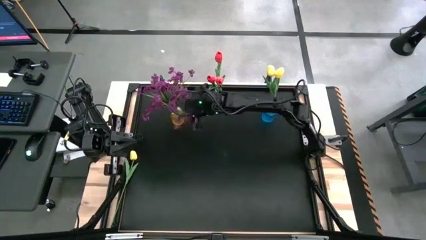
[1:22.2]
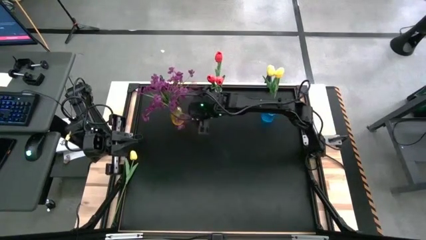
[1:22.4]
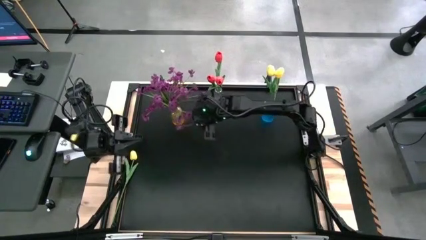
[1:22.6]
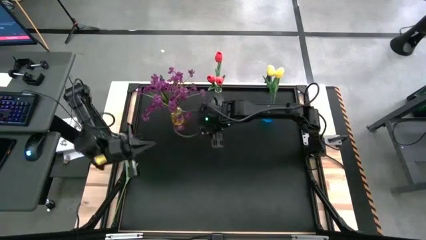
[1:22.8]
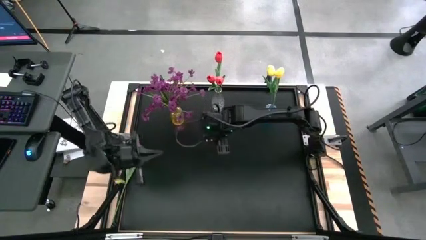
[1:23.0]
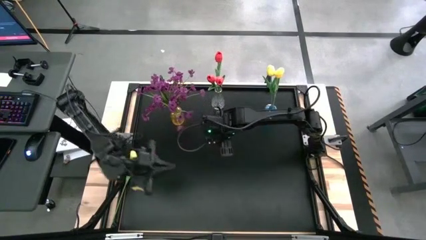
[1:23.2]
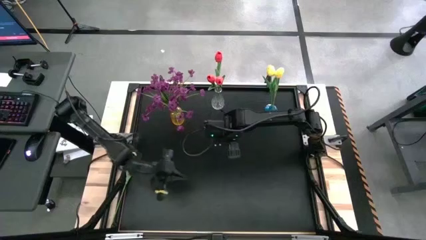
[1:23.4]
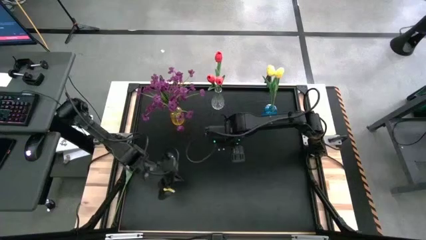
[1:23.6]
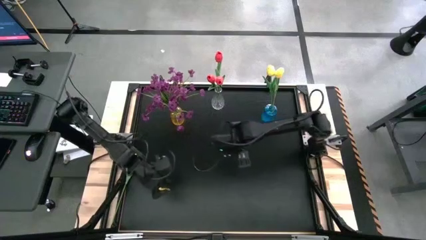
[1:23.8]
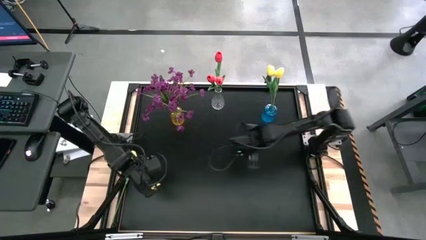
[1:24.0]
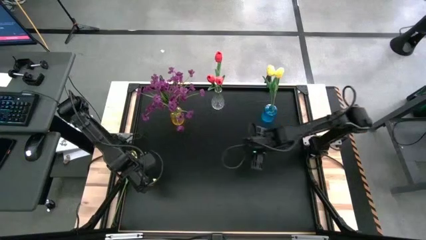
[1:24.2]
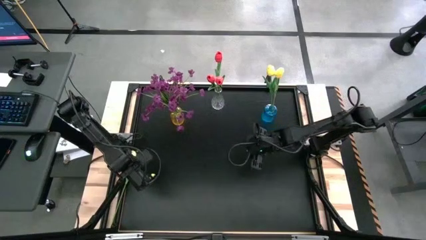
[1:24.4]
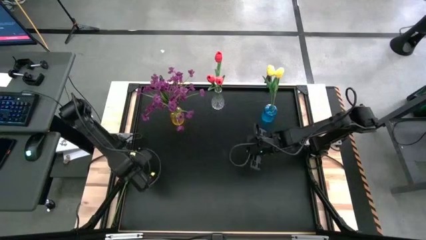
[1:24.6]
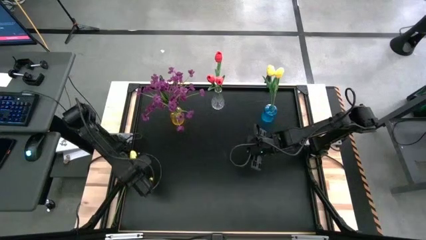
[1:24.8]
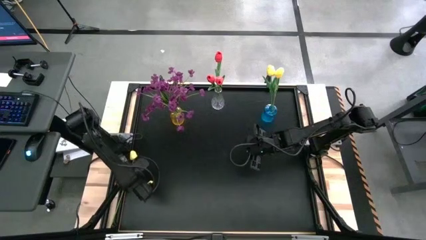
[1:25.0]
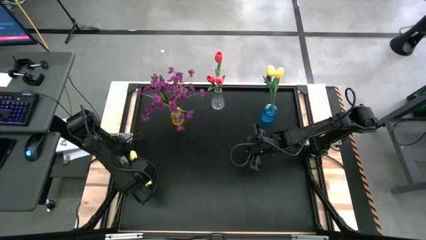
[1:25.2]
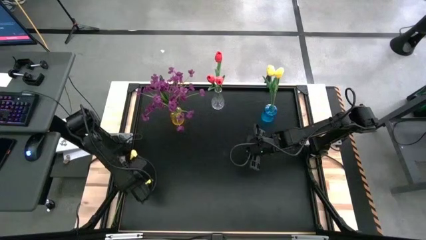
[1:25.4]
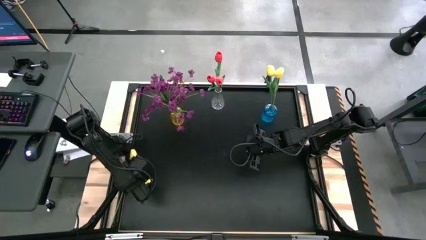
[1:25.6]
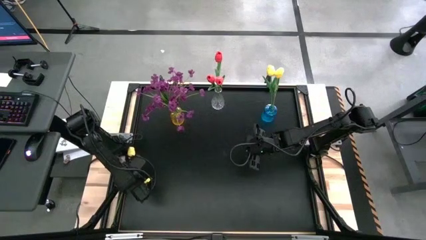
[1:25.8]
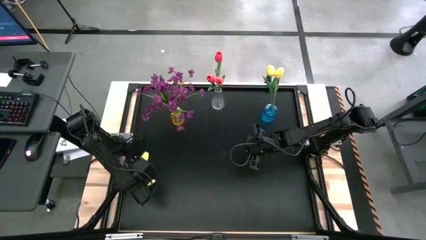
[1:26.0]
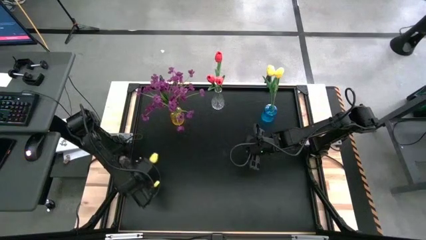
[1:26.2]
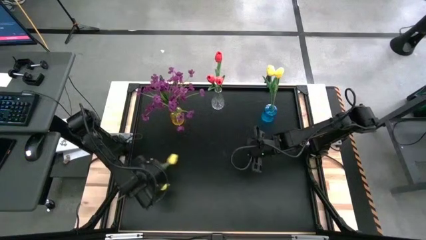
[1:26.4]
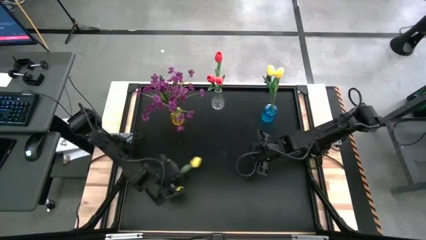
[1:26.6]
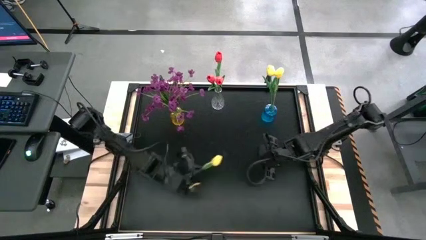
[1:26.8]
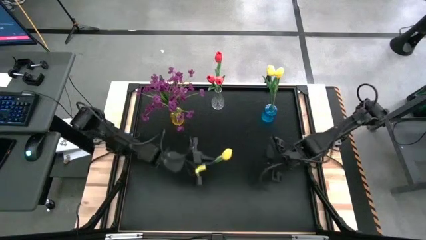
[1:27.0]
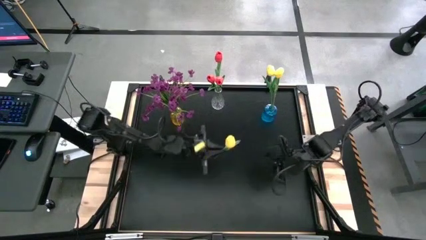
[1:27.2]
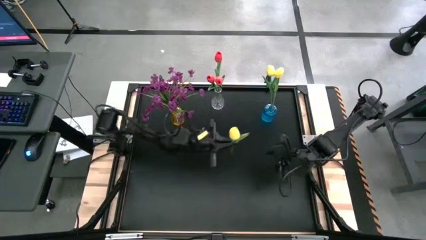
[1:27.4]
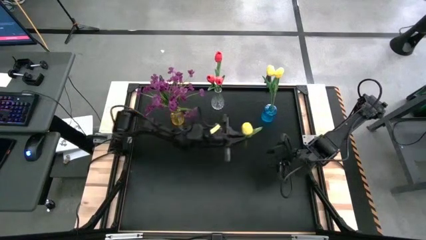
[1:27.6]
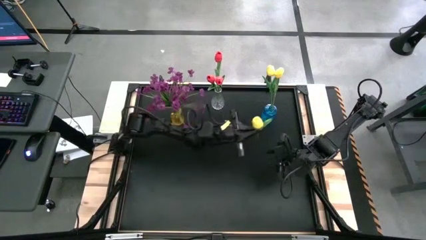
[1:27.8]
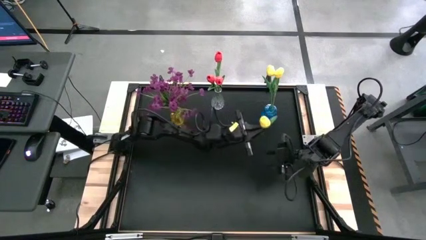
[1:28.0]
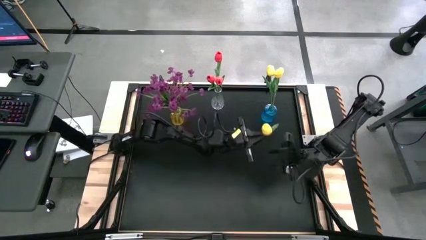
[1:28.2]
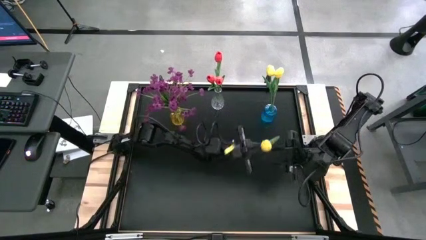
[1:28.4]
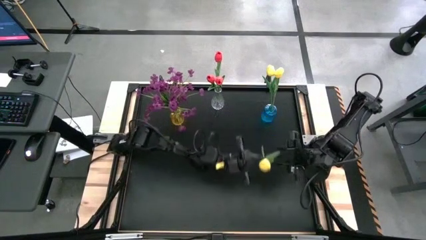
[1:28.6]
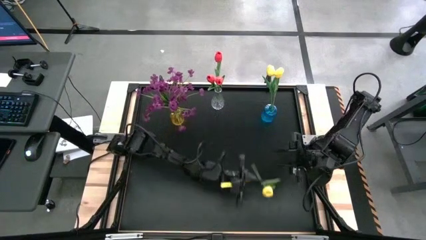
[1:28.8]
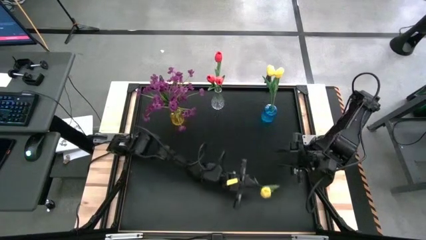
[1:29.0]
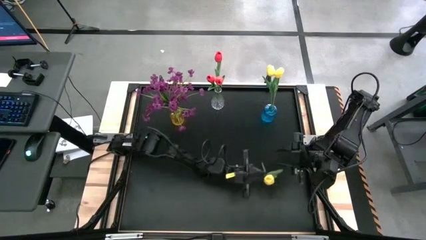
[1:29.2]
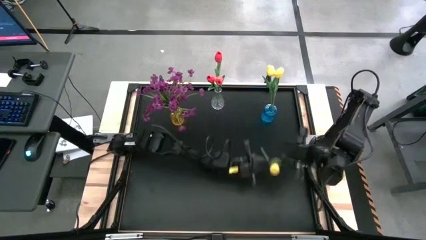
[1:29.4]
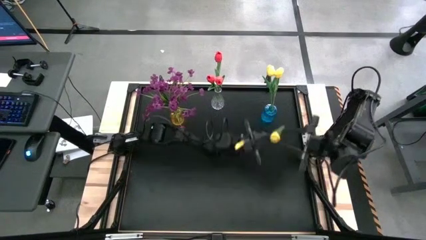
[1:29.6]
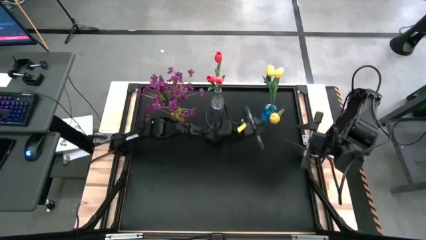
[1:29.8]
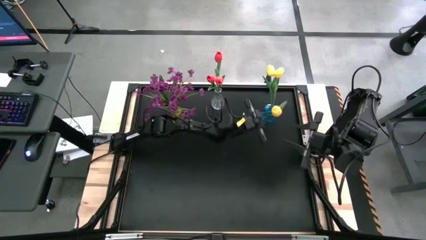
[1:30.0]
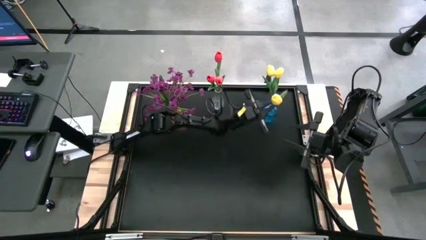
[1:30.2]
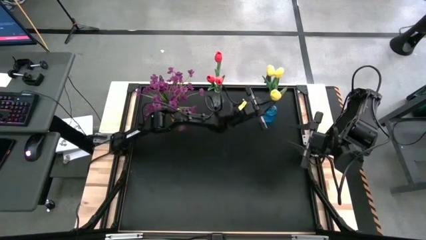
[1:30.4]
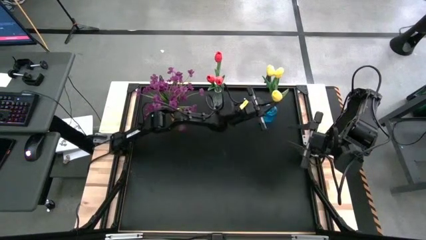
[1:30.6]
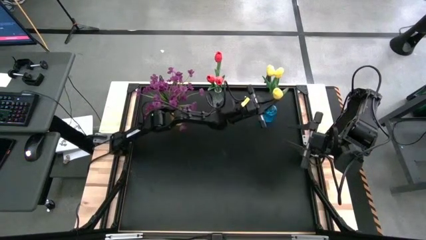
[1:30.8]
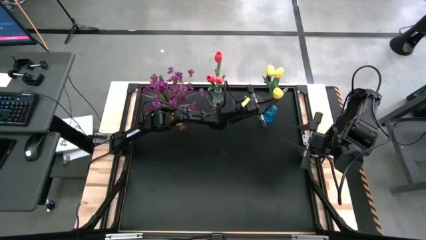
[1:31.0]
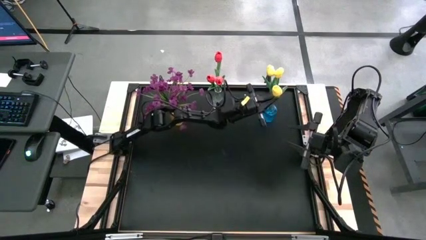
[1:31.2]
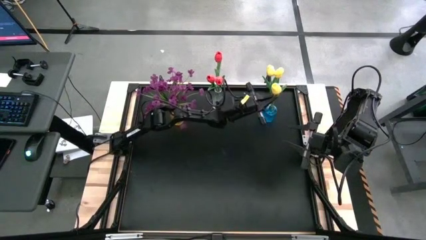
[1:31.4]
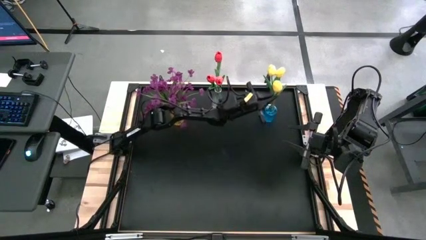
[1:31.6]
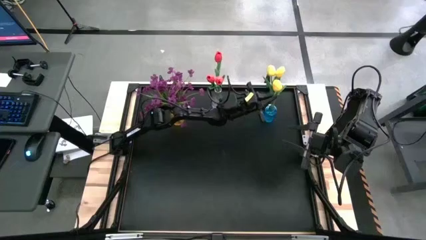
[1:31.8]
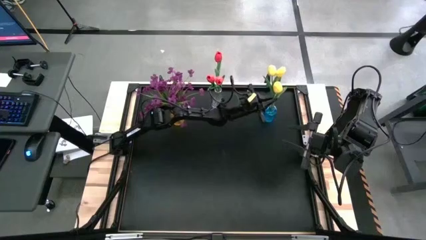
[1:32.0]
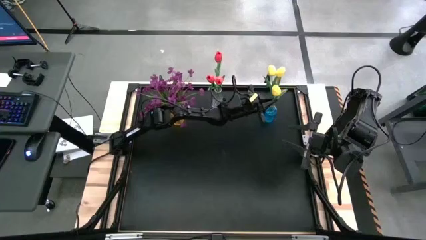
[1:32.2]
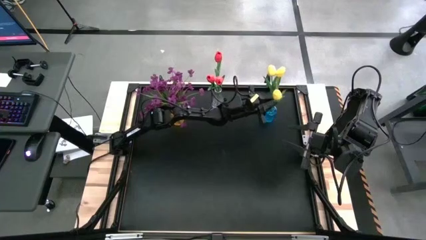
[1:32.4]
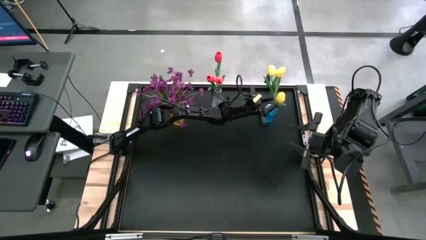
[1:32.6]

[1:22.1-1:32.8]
Task: Sort flowers into vase by color
Put the yellow flower into the blue flower vase
